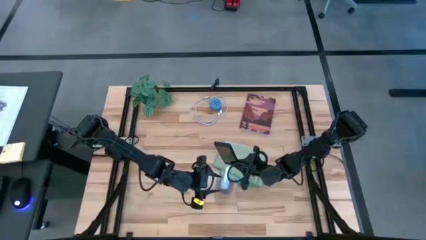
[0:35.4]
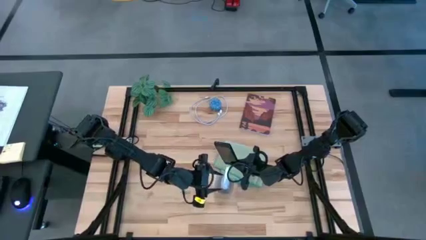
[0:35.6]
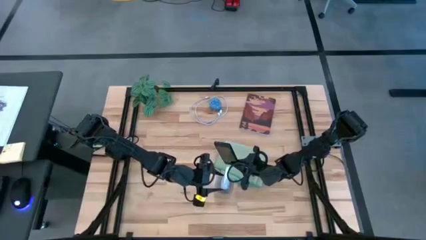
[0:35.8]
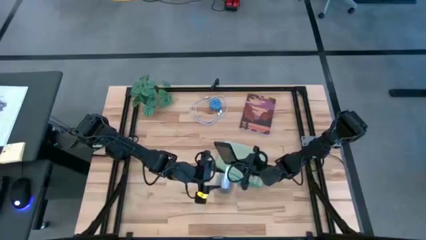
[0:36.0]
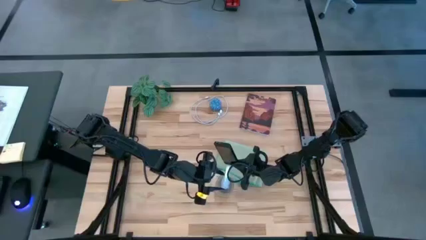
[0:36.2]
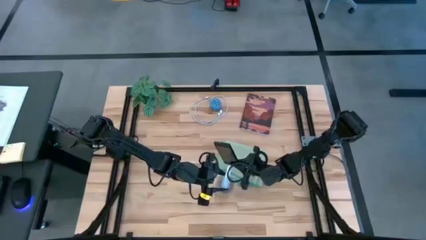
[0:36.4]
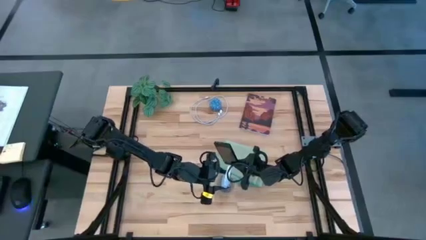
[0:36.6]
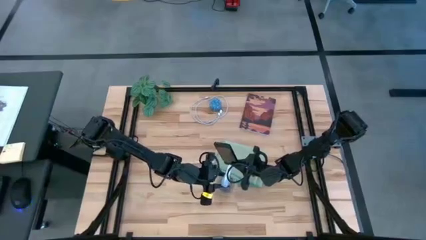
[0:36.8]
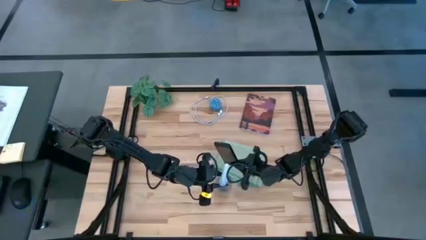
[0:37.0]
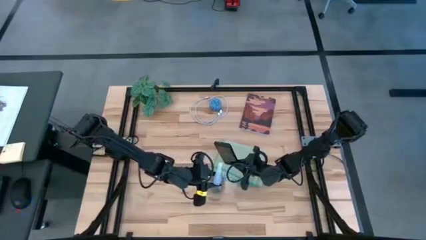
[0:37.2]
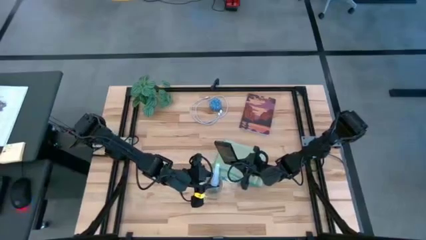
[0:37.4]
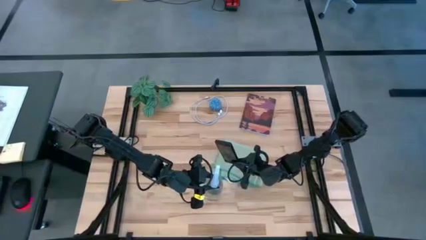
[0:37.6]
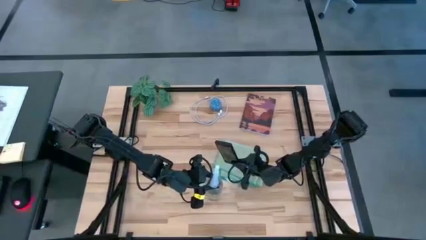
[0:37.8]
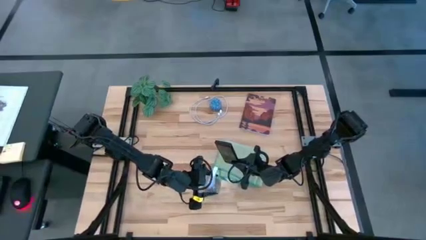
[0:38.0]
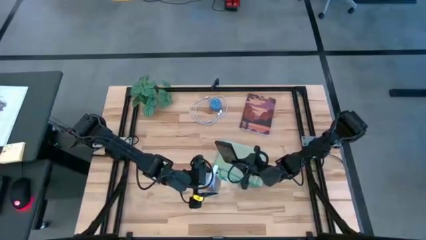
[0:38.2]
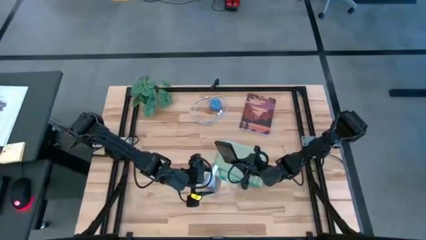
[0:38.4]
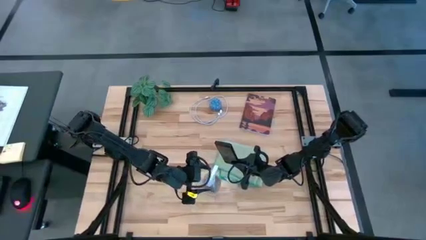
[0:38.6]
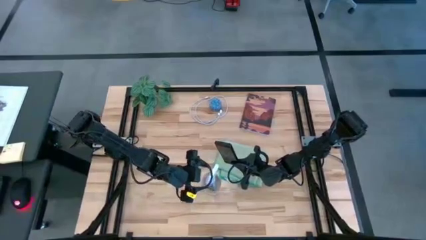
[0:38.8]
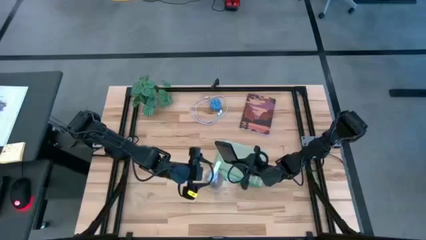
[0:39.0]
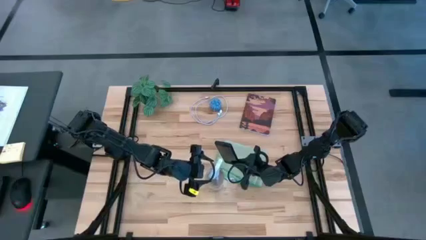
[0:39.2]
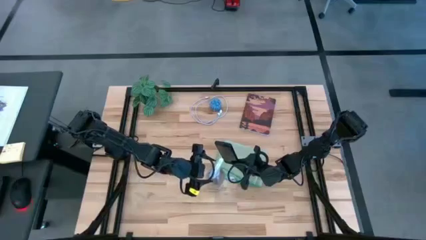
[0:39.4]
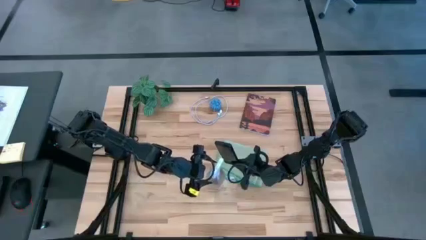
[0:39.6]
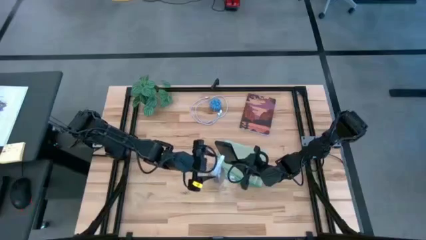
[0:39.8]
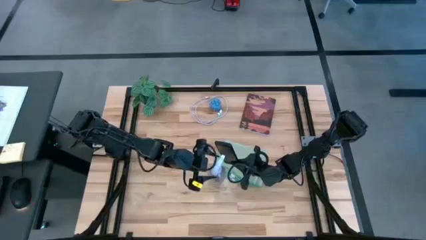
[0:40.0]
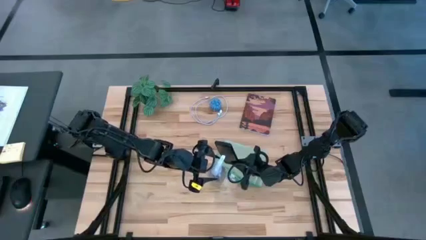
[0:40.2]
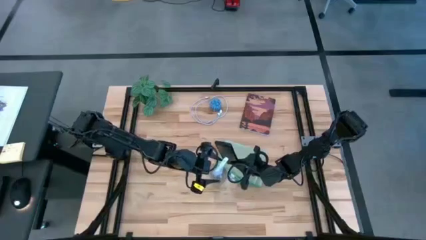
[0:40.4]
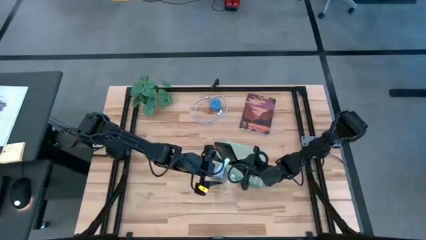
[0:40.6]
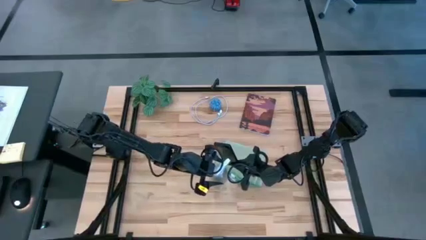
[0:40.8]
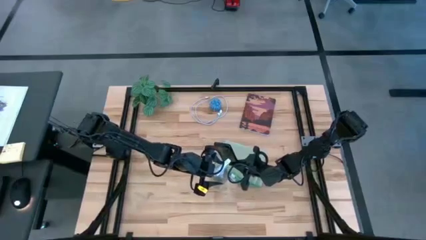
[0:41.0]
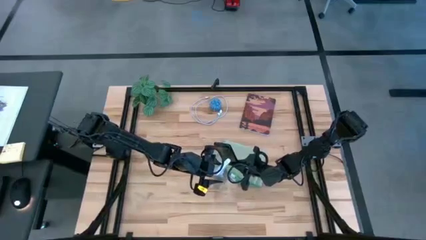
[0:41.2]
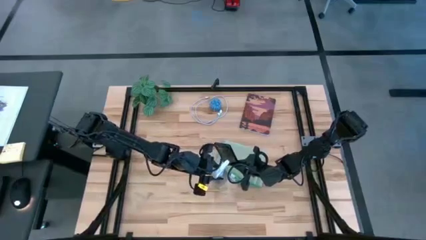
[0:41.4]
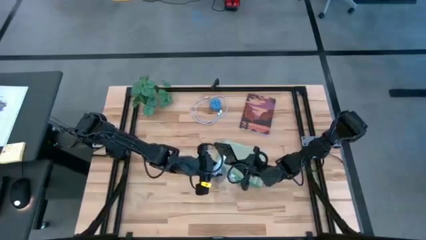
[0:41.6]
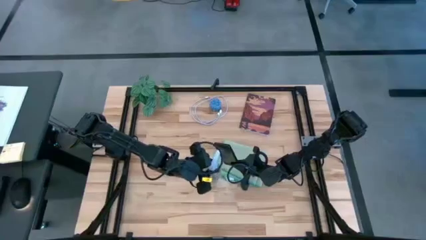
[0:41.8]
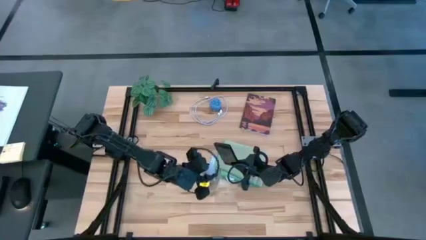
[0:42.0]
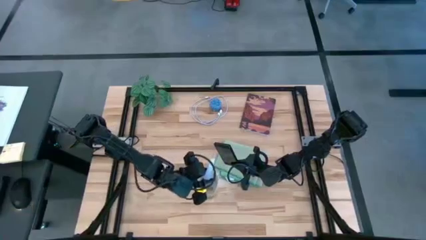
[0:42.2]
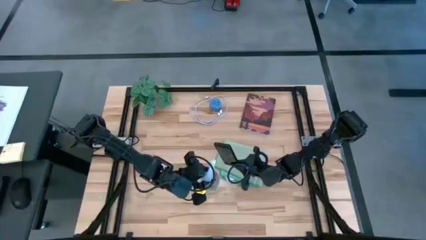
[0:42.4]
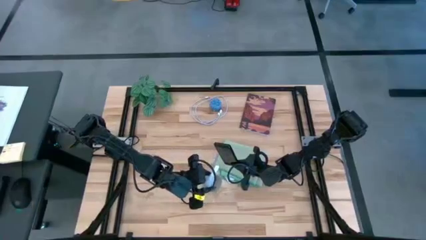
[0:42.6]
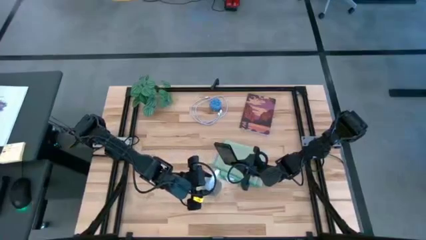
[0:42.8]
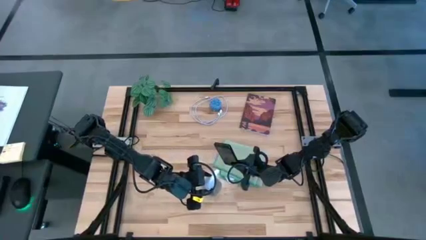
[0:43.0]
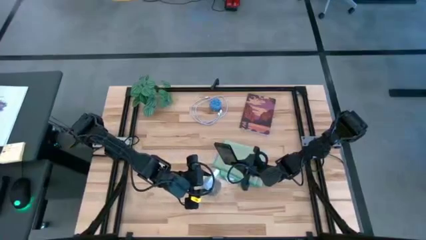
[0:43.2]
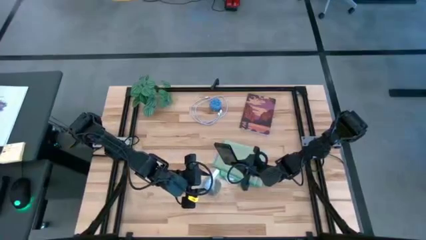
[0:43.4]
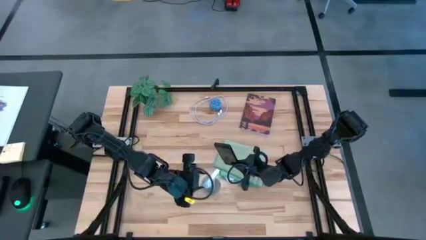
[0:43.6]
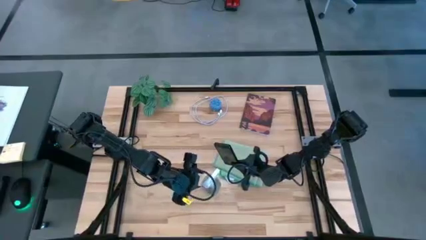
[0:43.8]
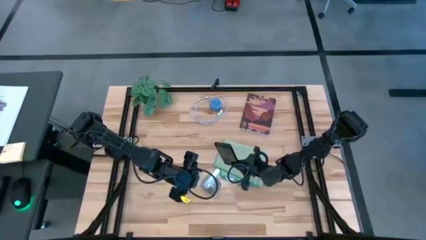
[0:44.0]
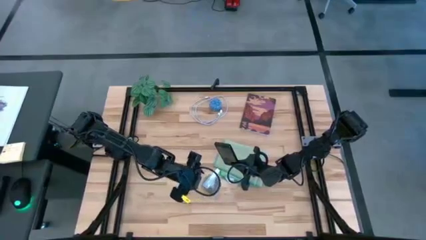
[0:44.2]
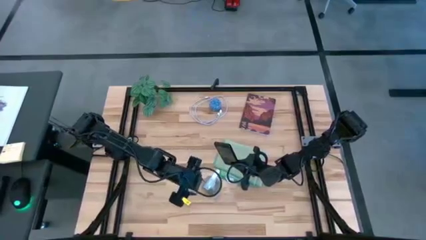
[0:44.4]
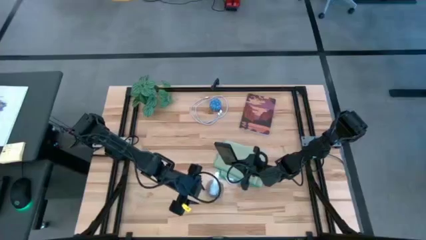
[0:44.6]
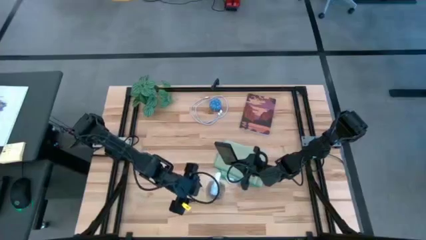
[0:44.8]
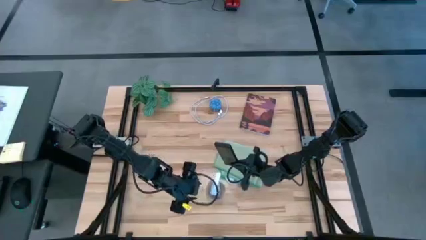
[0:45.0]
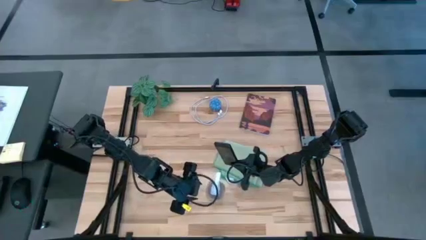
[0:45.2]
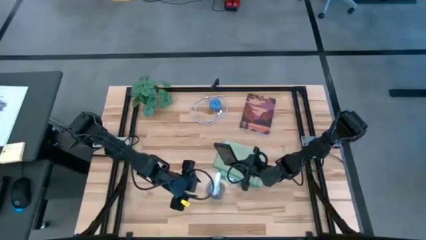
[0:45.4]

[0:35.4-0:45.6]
Task: Apply microfiber cloth
Spray the front of the black cellphone with the spray bottle

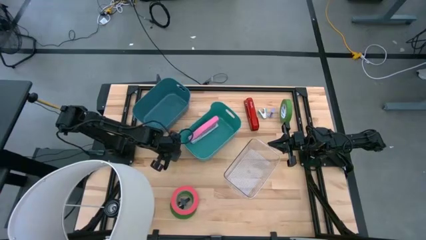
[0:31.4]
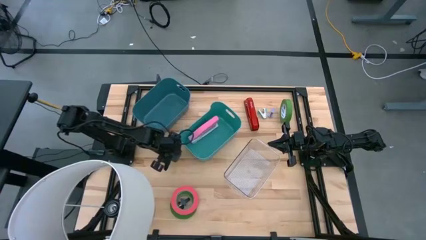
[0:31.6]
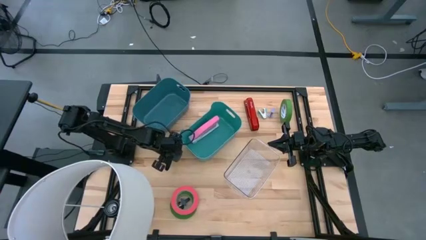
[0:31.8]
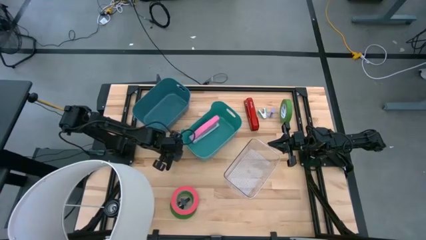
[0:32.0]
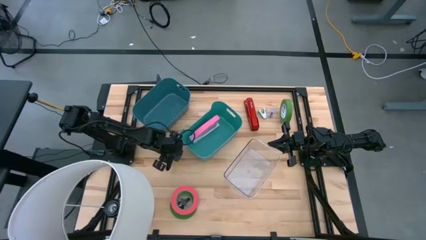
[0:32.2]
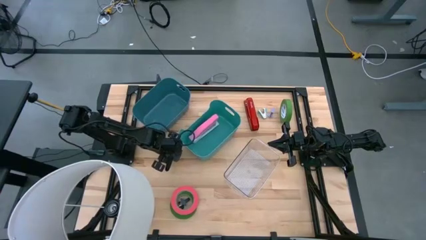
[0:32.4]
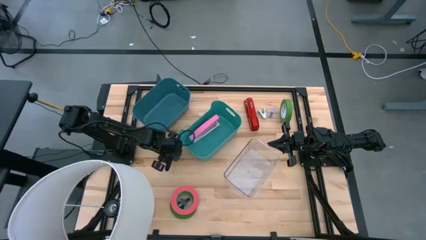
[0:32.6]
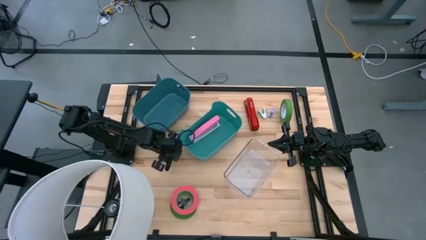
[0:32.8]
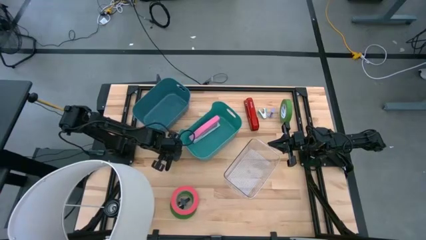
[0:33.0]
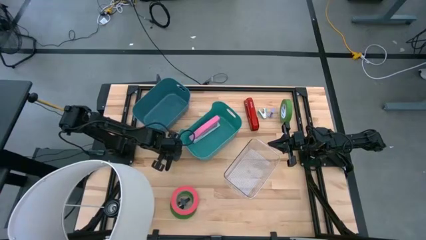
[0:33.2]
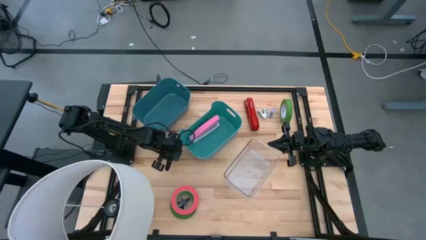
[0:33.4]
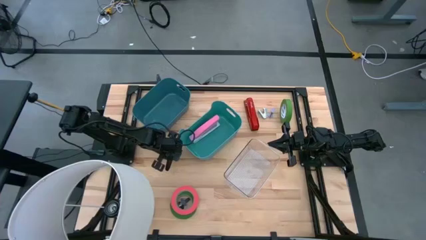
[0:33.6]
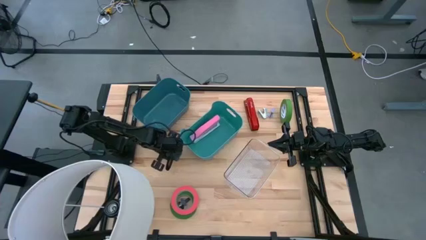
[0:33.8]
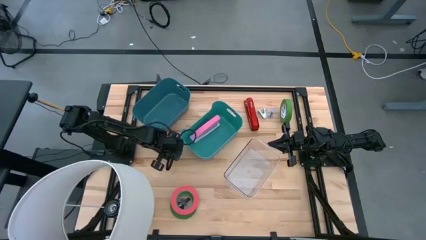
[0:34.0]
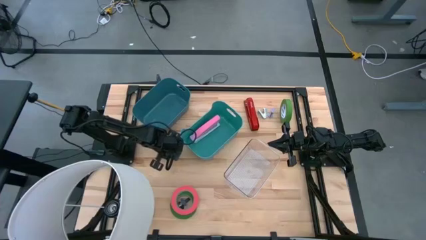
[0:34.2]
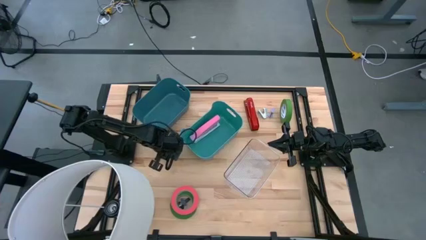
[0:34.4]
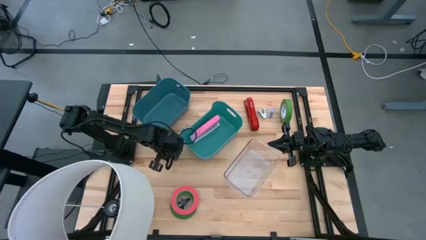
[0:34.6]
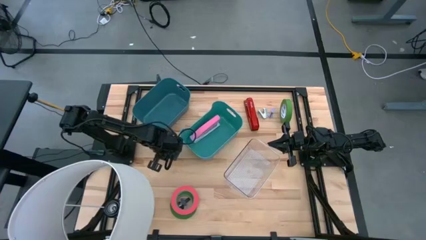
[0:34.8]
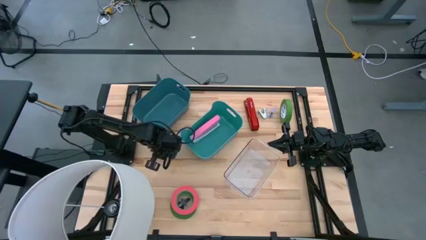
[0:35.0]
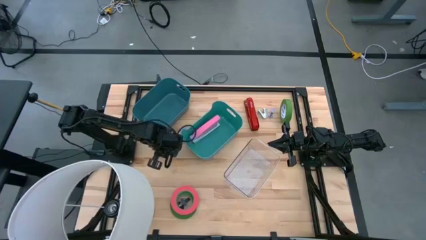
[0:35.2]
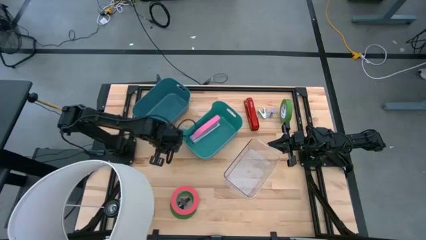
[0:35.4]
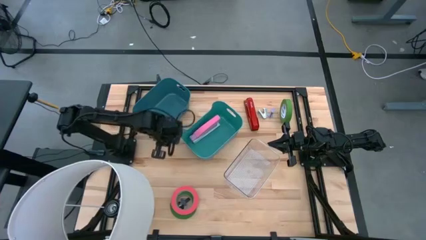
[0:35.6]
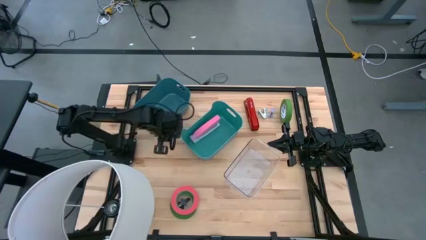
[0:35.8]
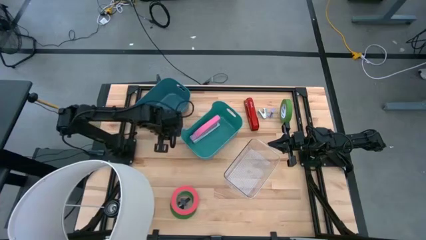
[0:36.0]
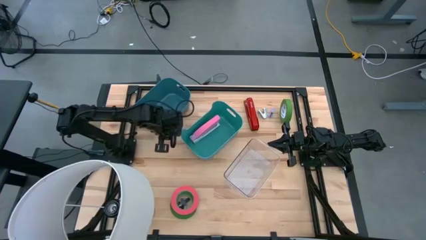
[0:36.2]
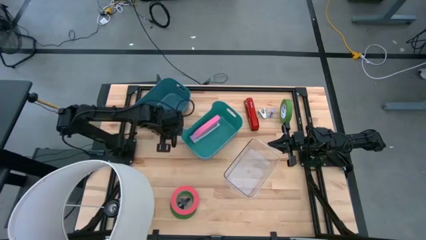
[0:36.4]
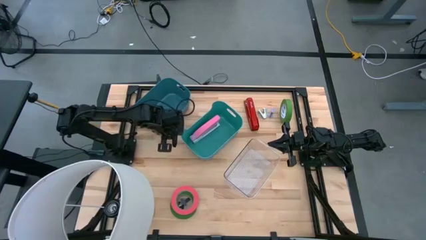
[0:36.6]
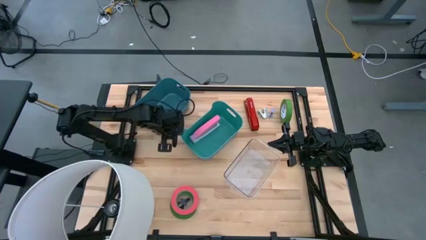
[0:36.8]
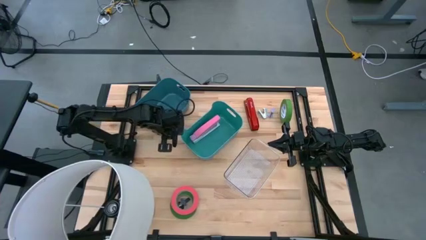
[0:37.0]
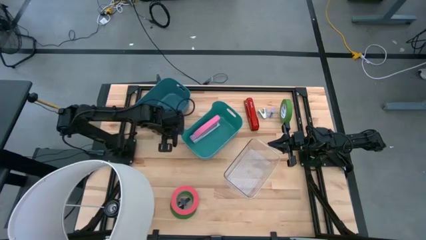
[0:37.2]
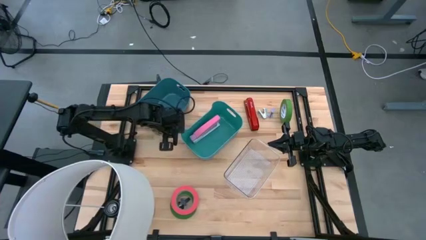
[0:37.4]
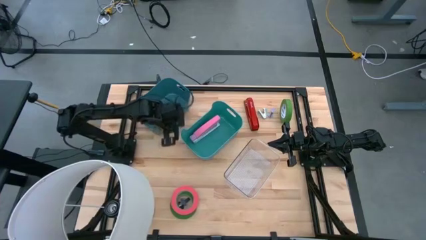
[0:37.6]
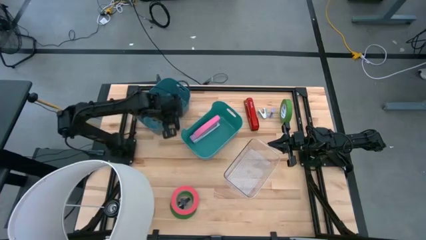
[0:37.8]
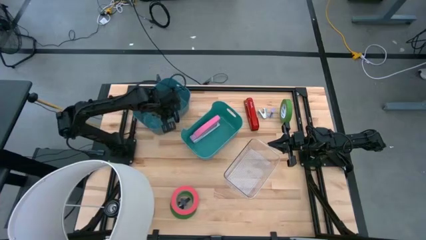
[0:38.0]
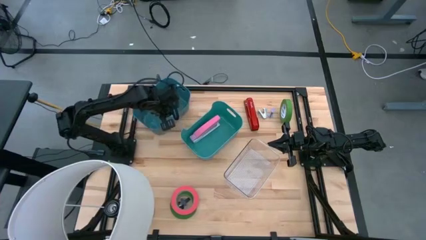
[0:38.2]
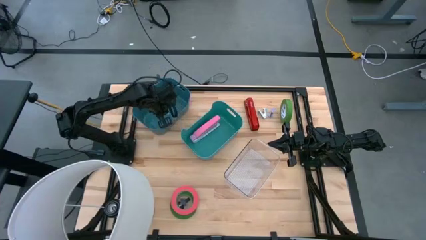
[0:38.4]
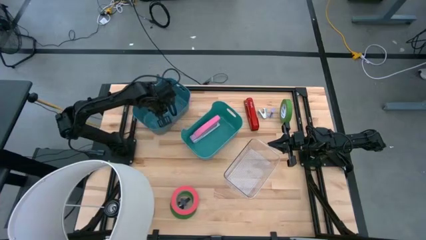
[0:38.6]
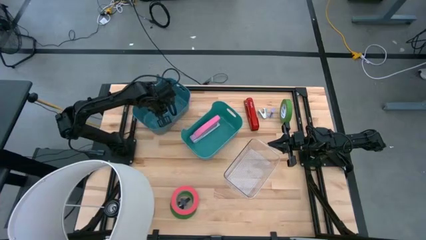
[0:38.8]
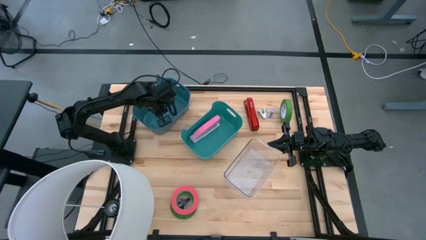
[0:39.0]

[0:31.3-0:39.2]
Task: Pick and place Stapler, Stapler remover, tape
Put the blue staple remover into the blue bin
